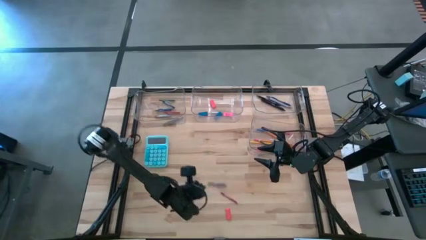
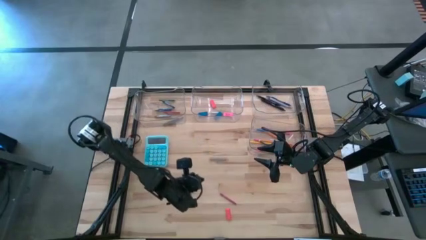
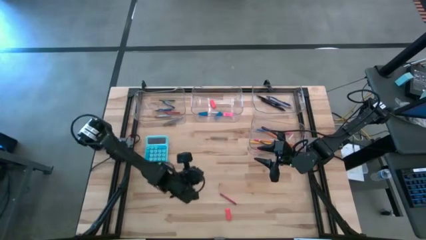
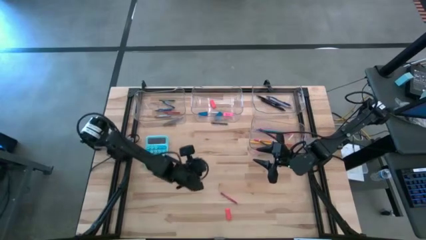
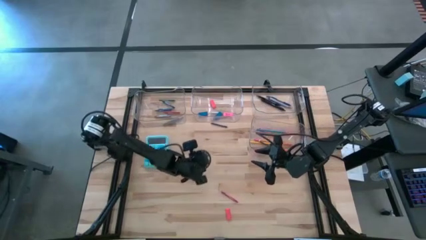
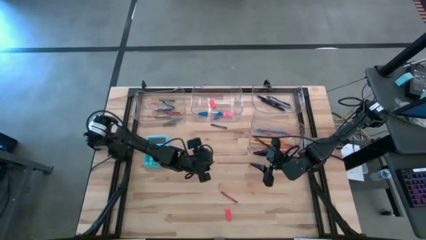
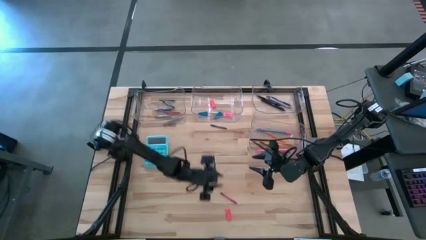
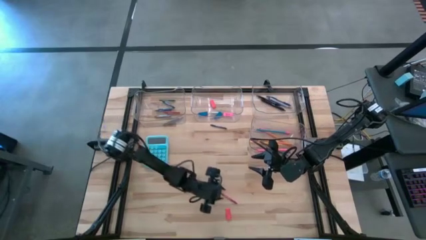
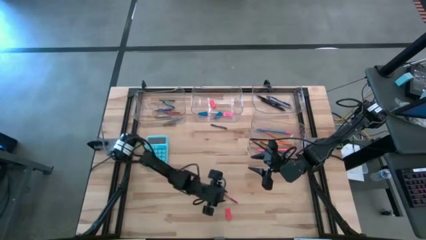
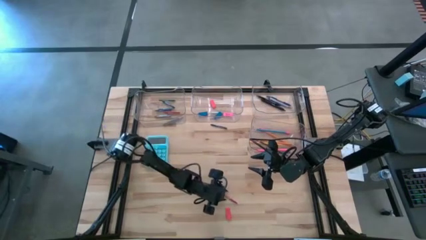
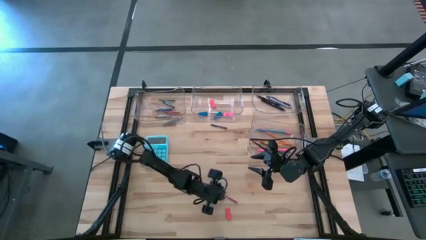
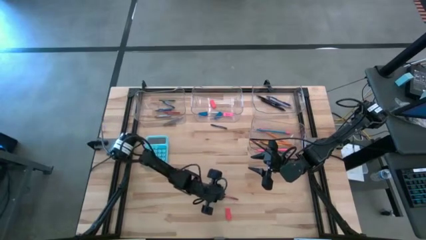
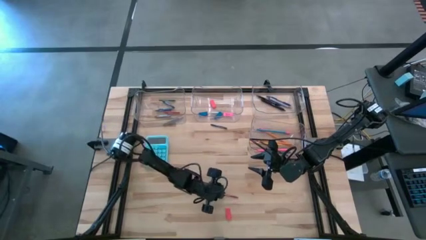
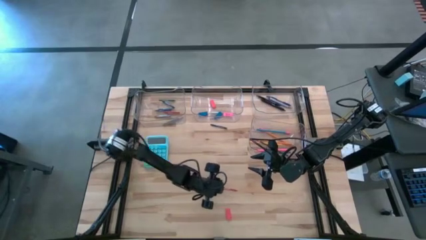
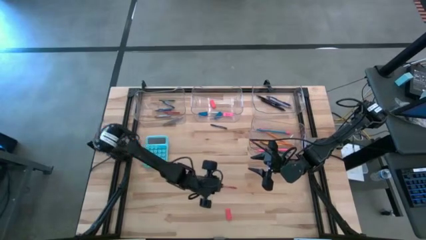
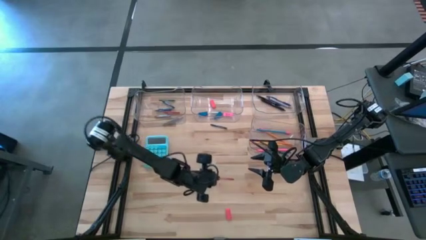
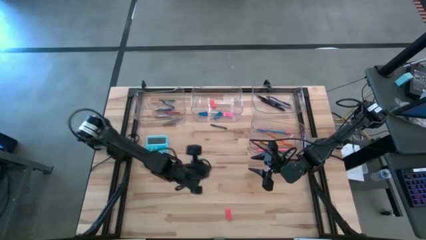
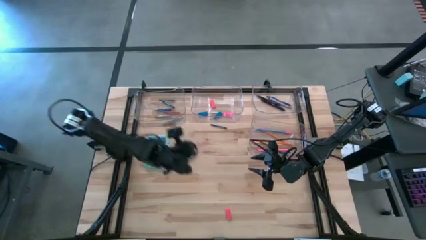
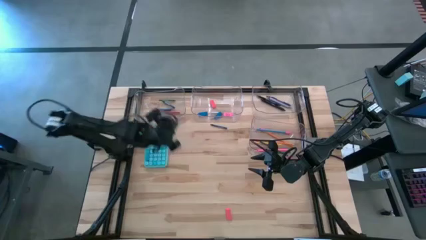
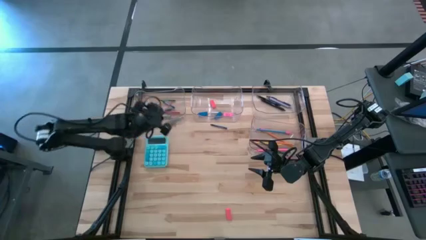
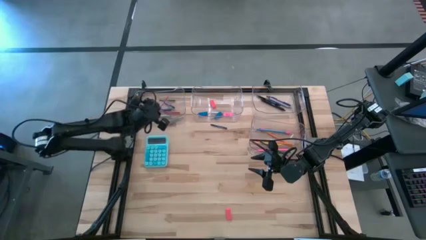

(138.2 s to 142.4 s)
Task: Sort crayons/erasers/pens/pencils in bins
Put the red crayon into the top left transparent bin

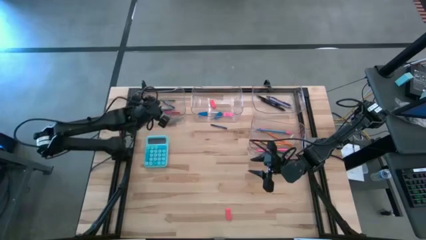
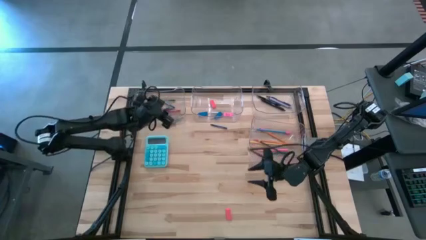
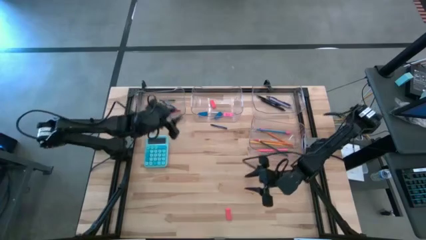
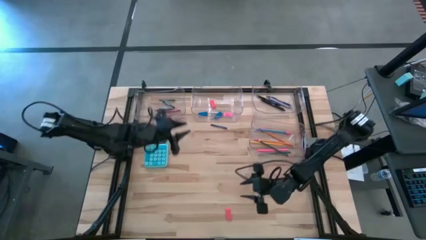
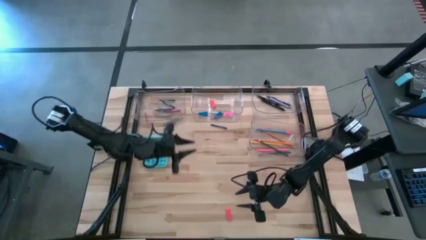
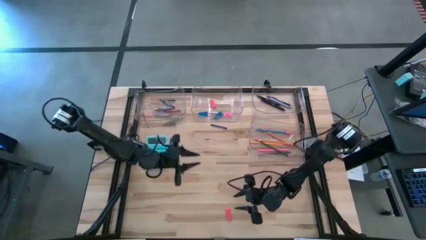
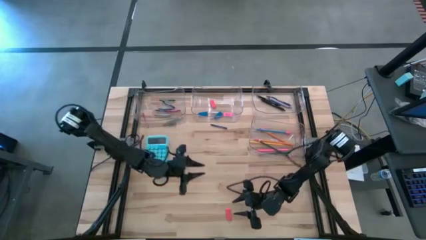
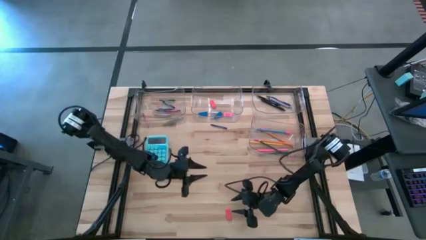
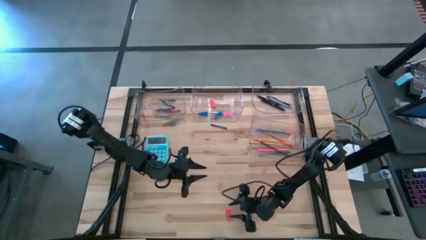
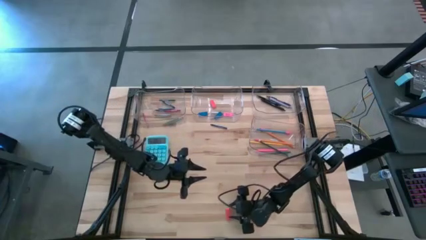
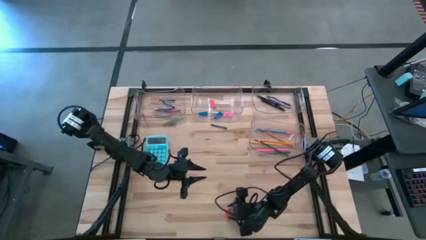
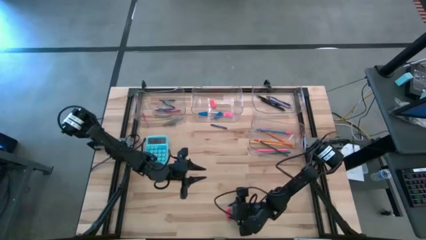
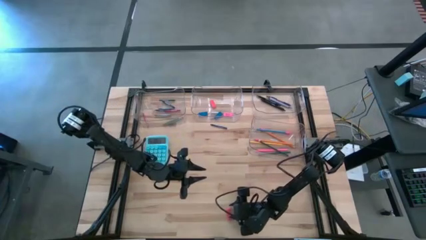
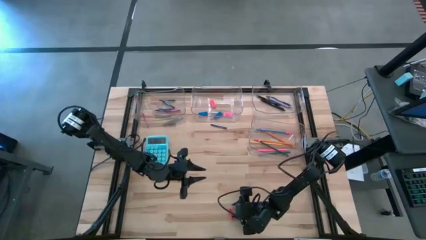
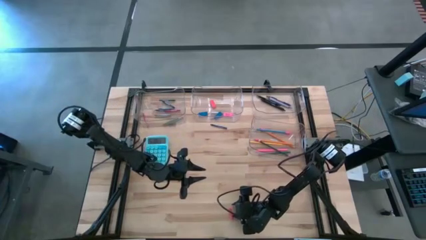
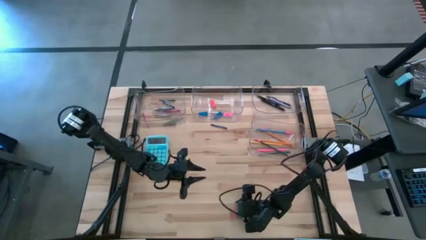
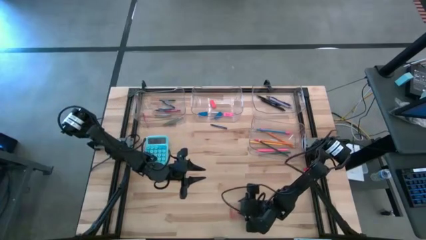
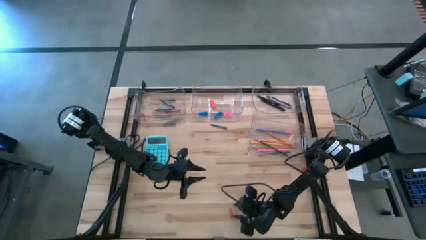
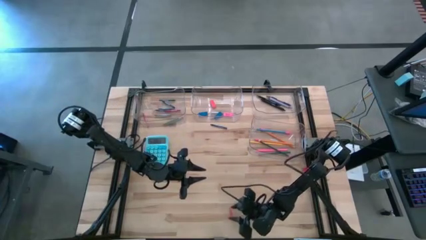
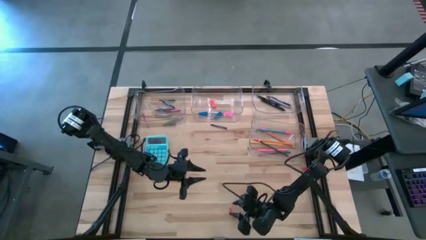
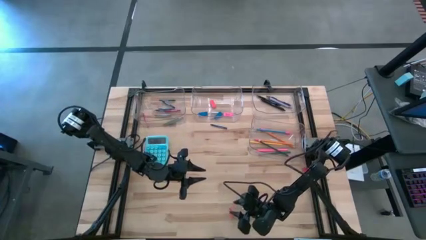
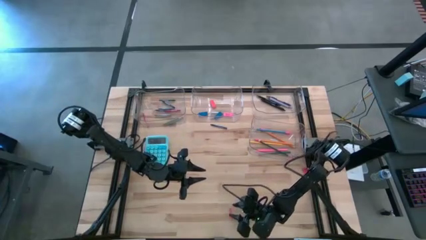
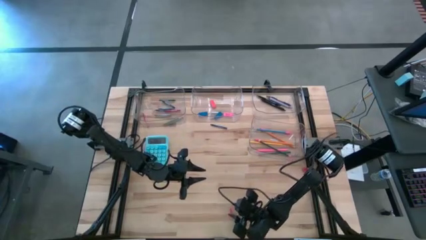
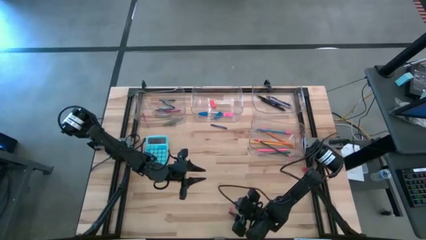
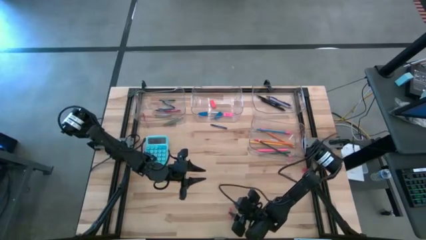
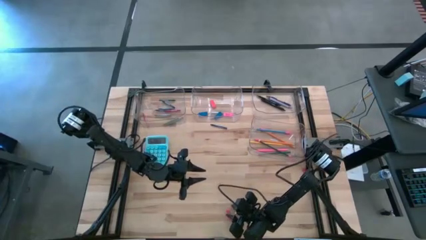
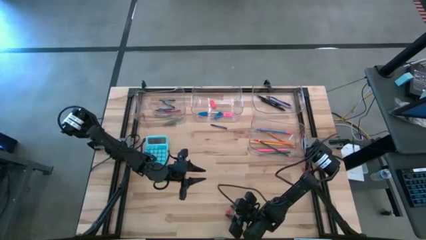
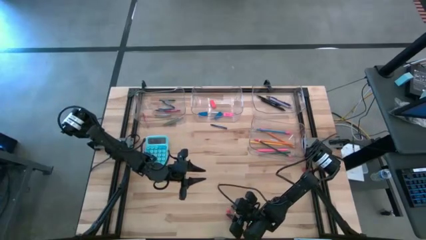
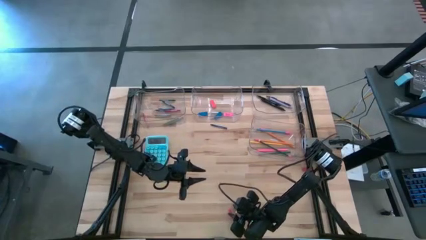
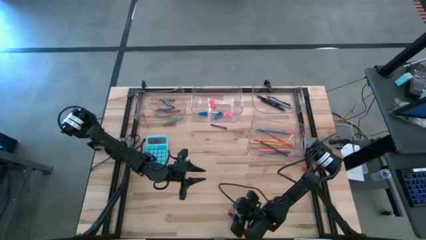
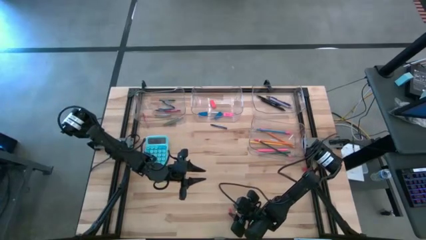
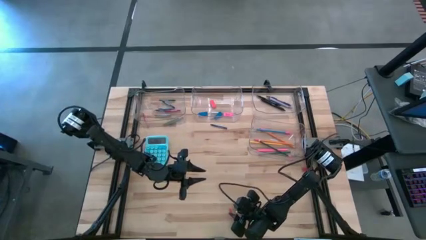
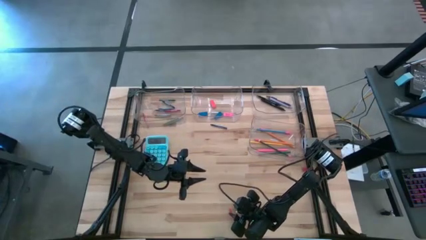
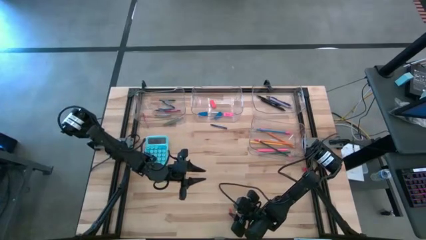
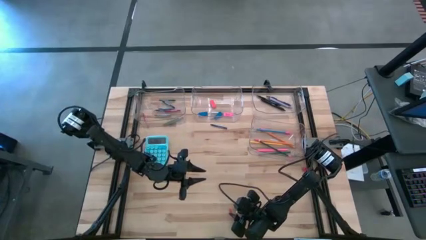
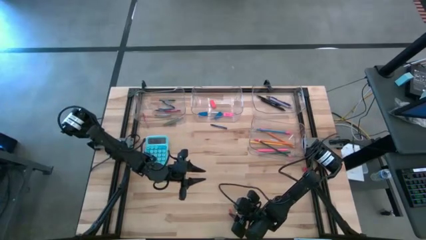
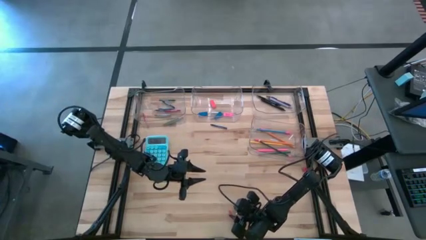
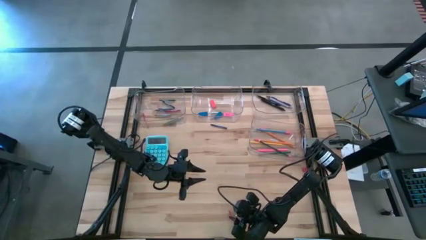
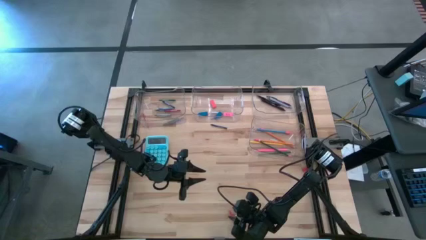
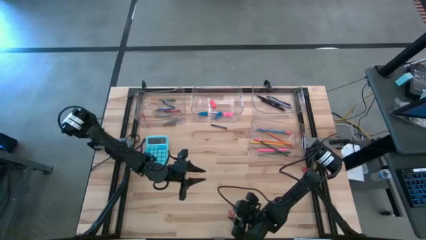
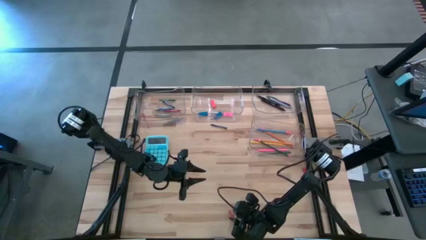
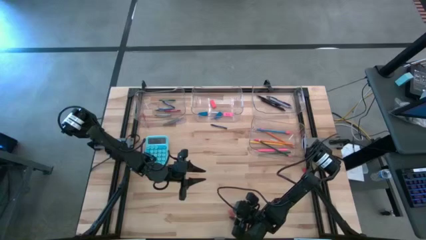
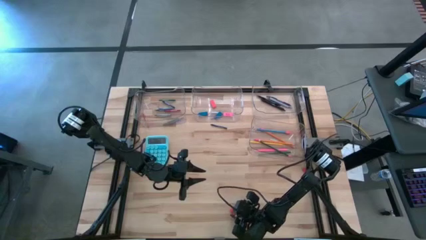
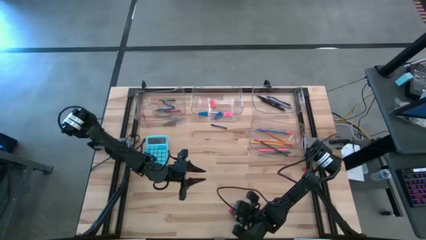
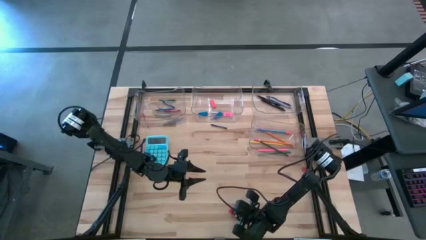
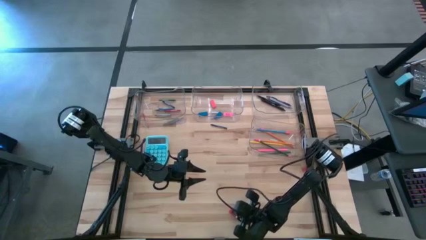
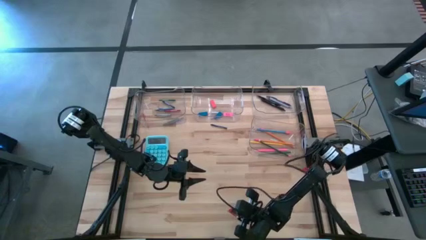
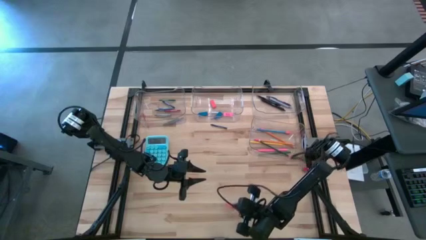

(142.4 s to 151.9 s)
Put the orange eraser into the top center transparent bin

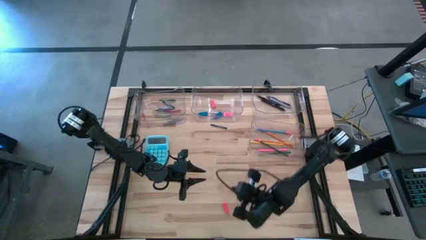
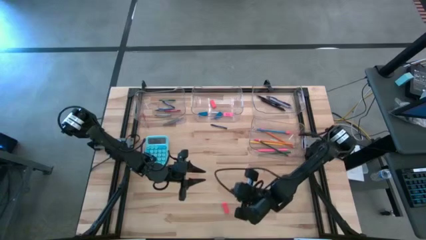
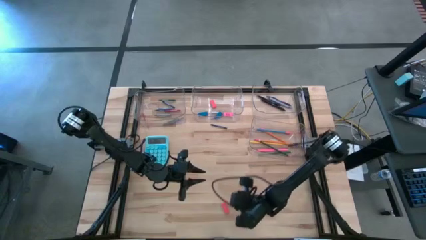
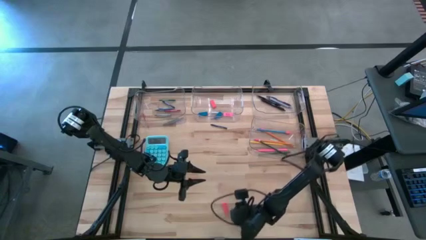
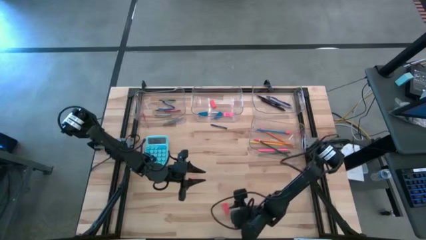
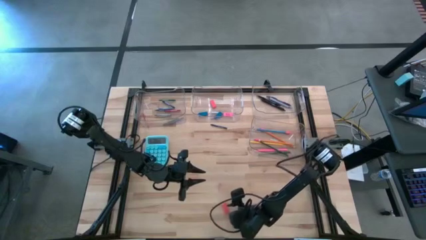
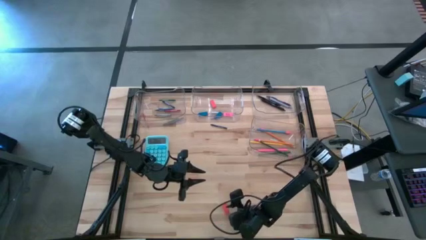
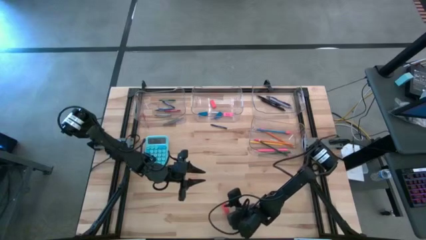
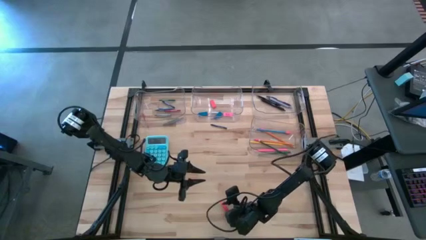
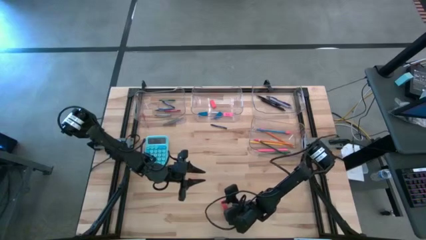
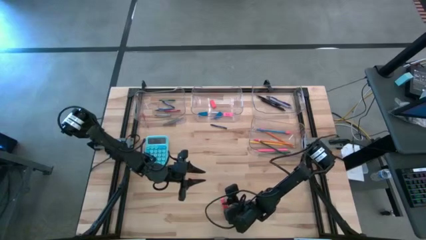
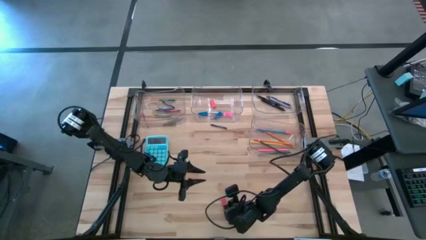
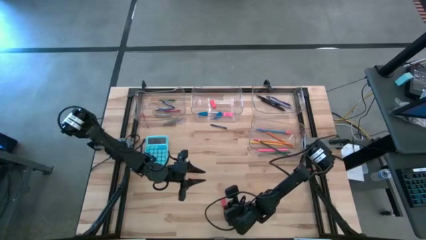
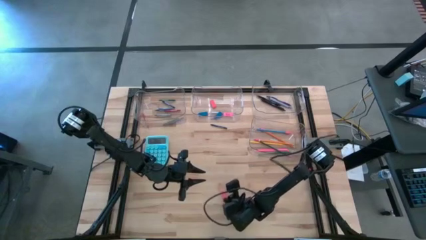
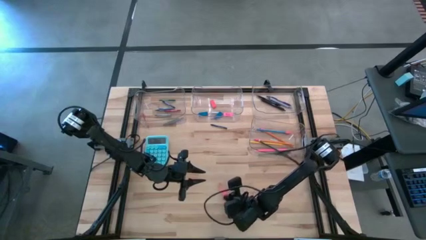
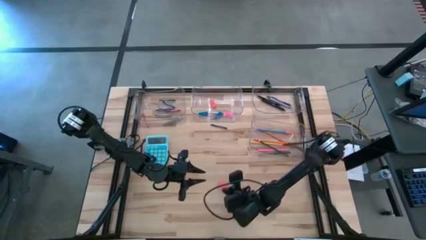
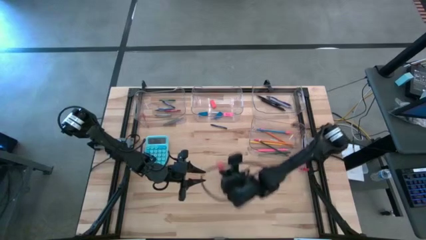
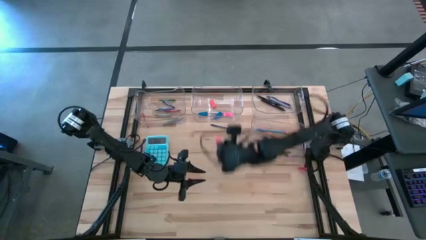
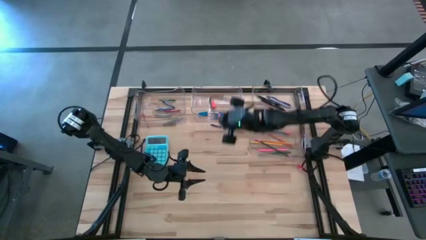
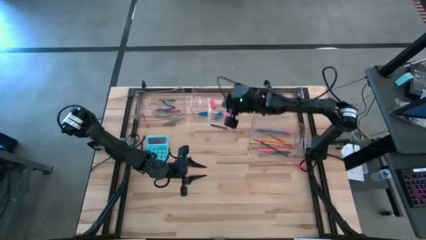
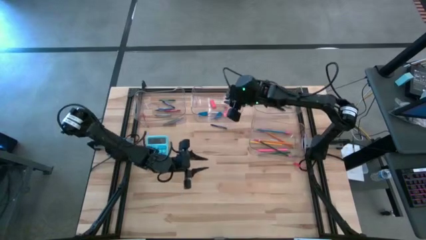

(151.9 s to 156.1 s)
Put the orange eraser into the top center transparent bin
